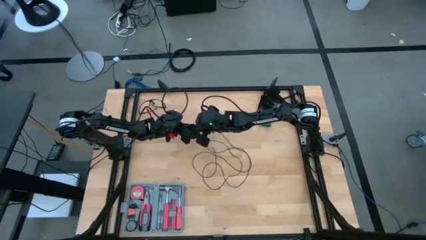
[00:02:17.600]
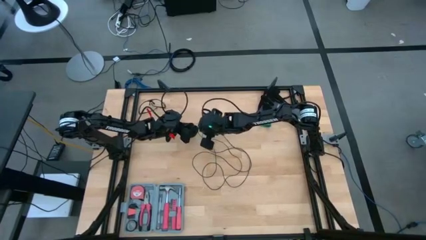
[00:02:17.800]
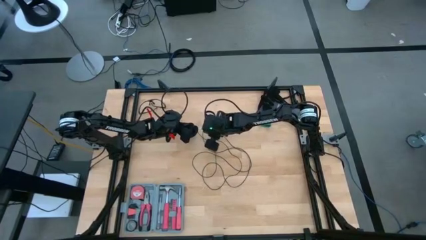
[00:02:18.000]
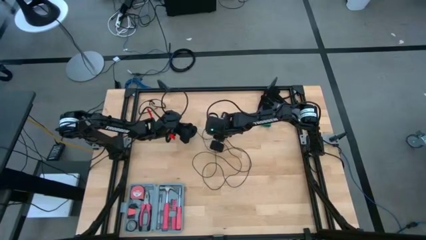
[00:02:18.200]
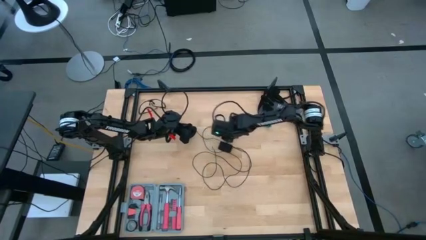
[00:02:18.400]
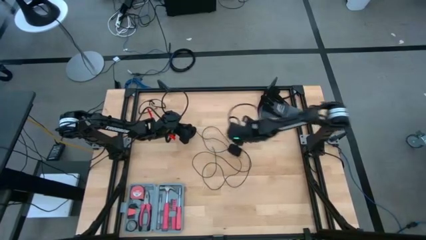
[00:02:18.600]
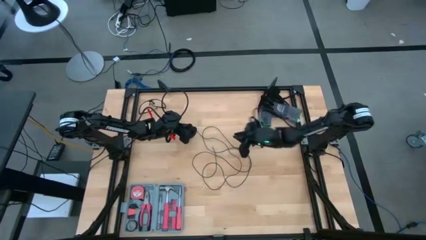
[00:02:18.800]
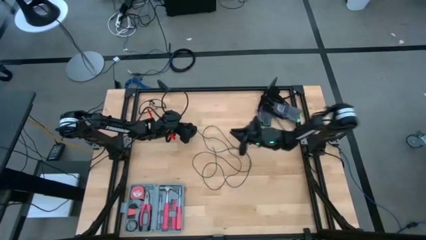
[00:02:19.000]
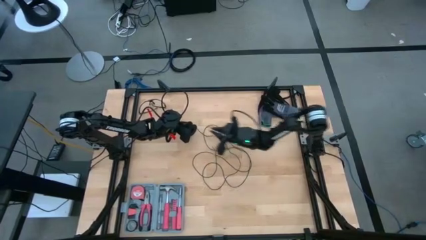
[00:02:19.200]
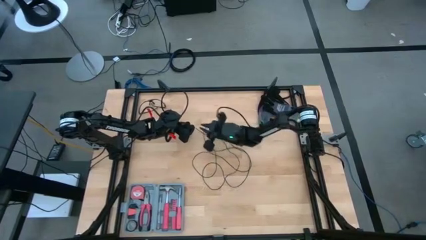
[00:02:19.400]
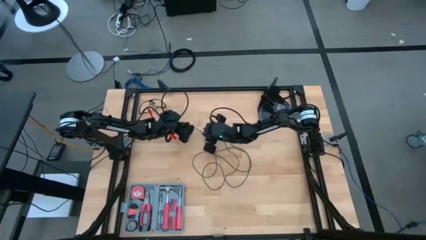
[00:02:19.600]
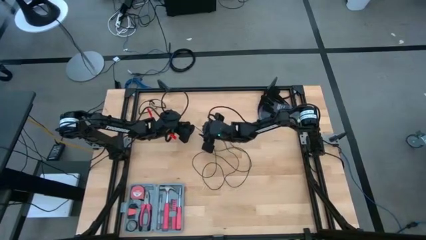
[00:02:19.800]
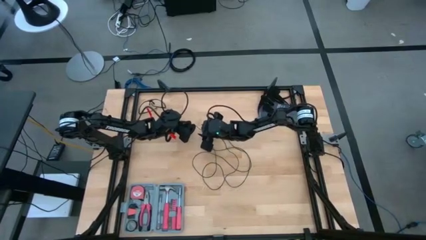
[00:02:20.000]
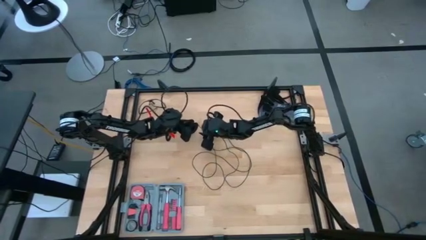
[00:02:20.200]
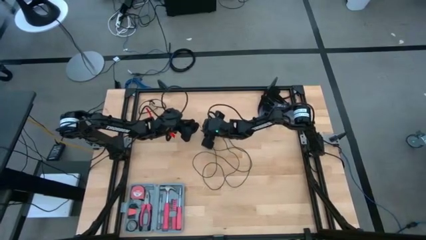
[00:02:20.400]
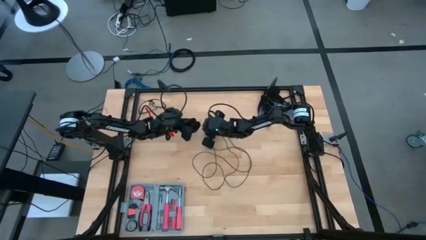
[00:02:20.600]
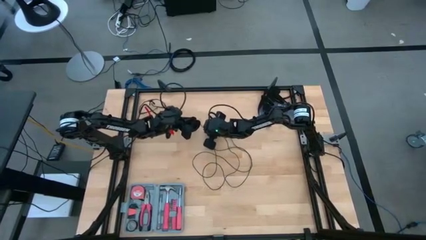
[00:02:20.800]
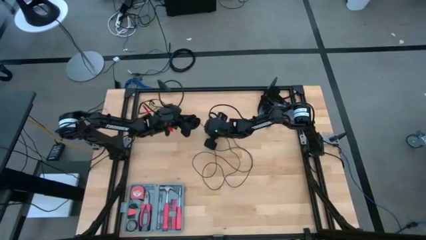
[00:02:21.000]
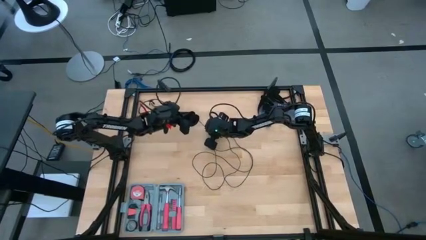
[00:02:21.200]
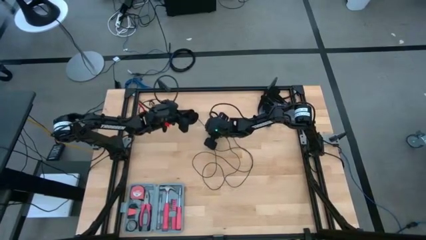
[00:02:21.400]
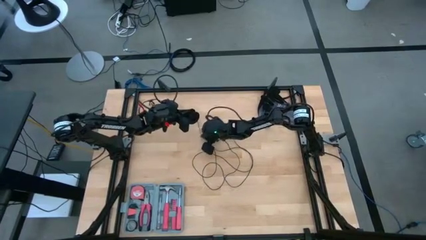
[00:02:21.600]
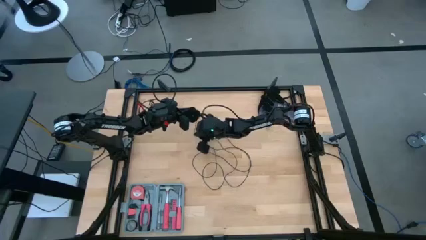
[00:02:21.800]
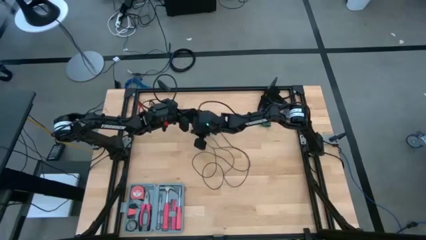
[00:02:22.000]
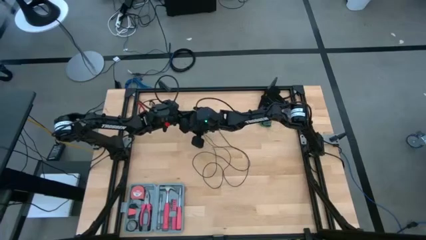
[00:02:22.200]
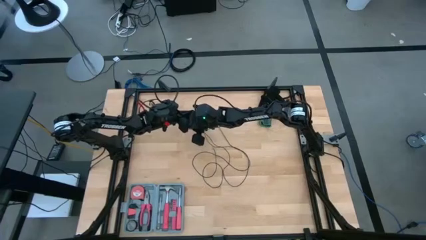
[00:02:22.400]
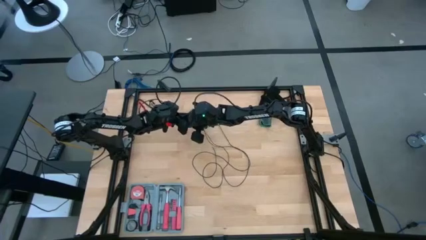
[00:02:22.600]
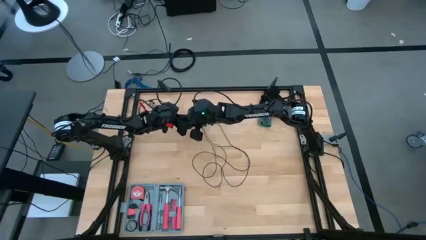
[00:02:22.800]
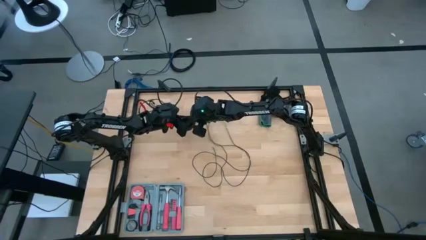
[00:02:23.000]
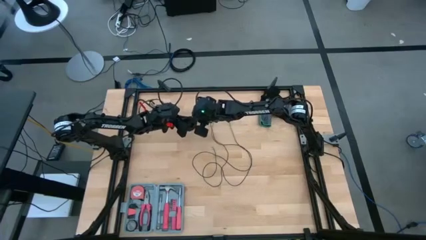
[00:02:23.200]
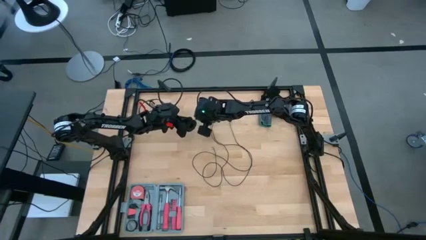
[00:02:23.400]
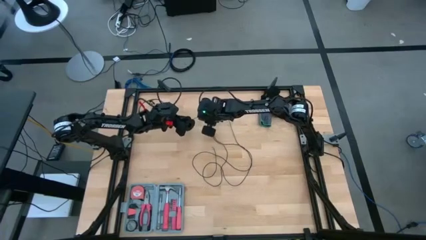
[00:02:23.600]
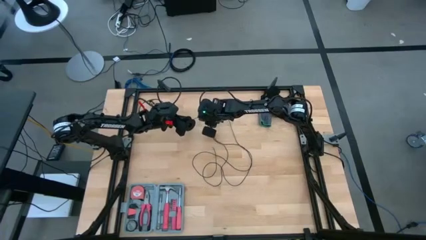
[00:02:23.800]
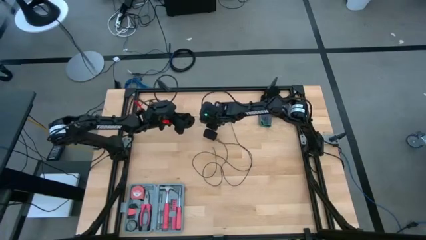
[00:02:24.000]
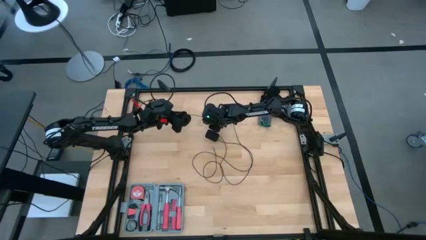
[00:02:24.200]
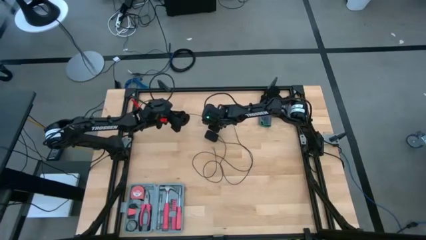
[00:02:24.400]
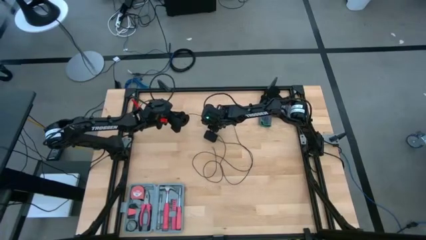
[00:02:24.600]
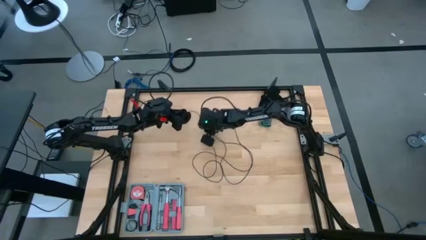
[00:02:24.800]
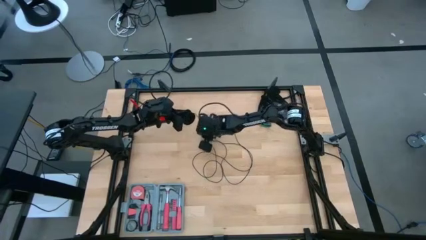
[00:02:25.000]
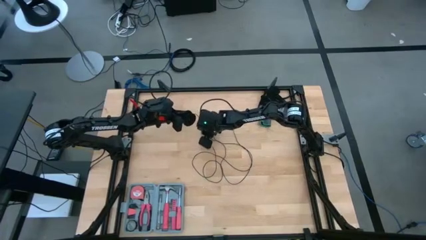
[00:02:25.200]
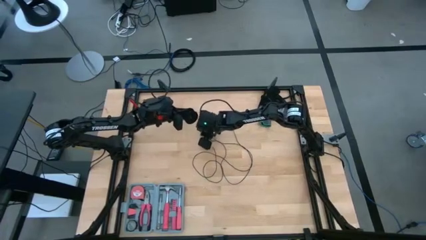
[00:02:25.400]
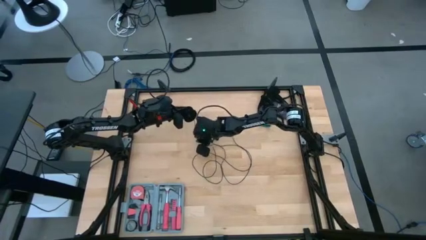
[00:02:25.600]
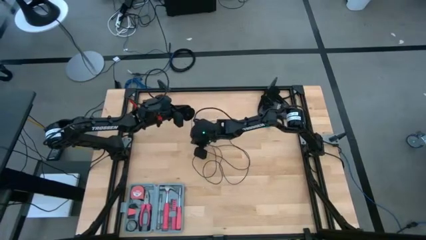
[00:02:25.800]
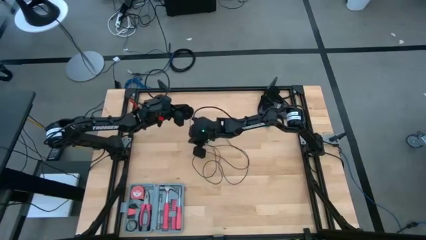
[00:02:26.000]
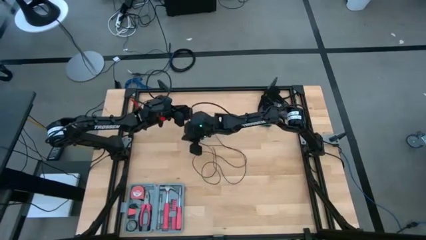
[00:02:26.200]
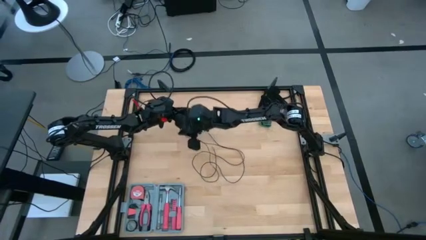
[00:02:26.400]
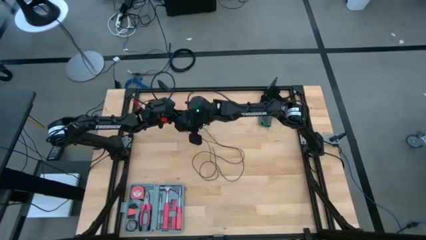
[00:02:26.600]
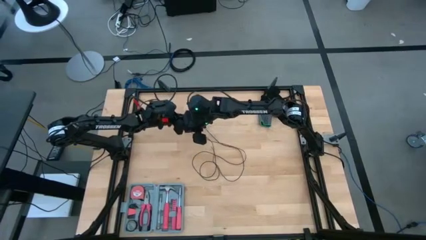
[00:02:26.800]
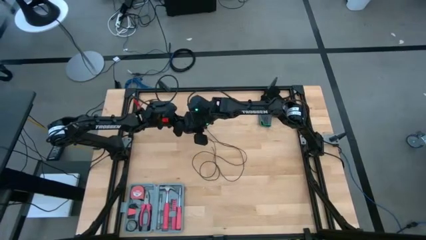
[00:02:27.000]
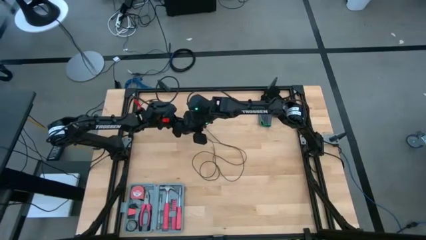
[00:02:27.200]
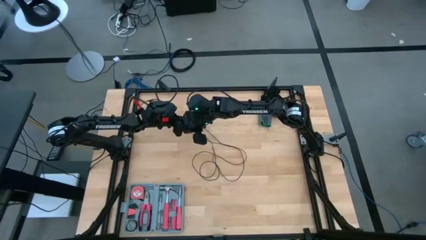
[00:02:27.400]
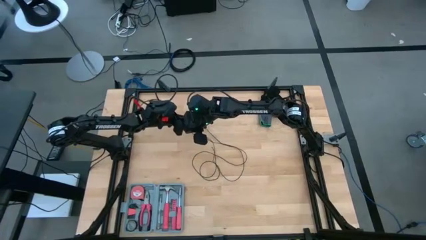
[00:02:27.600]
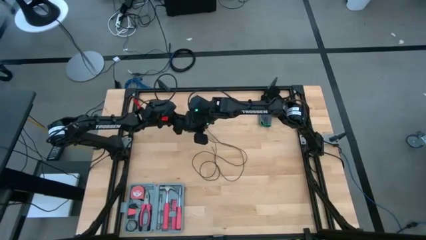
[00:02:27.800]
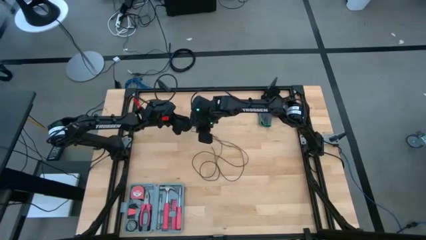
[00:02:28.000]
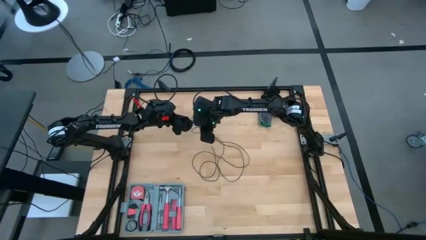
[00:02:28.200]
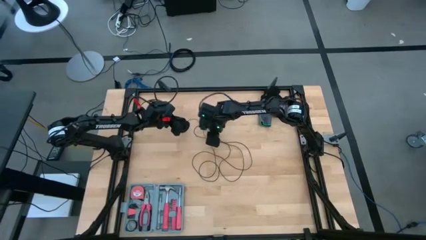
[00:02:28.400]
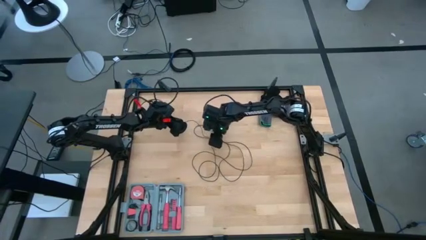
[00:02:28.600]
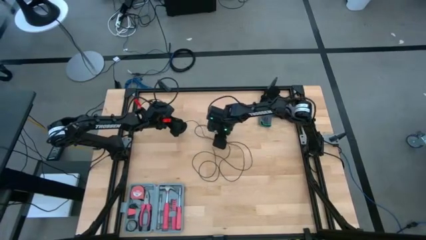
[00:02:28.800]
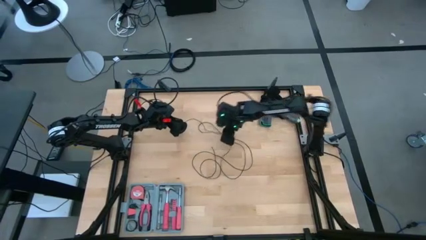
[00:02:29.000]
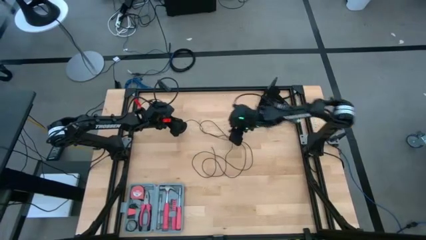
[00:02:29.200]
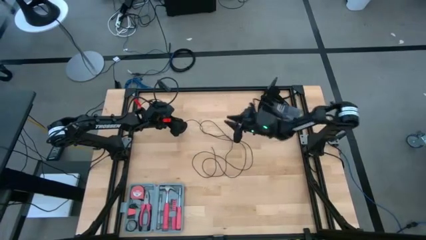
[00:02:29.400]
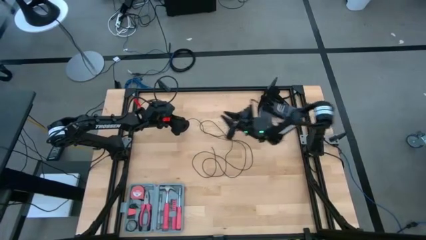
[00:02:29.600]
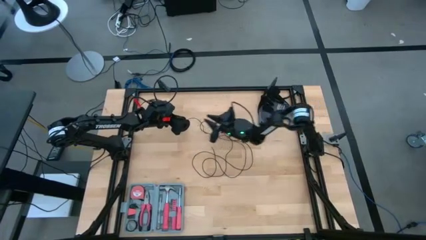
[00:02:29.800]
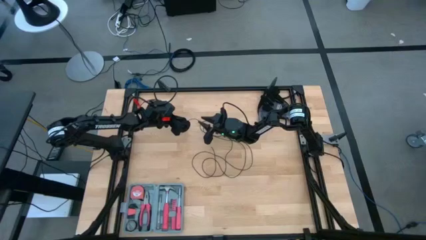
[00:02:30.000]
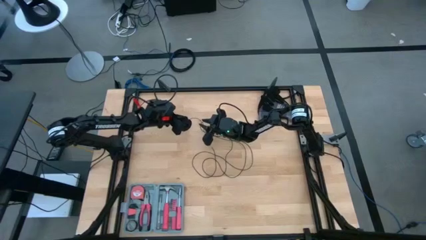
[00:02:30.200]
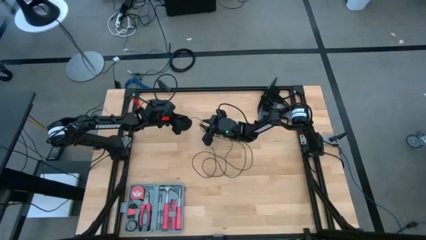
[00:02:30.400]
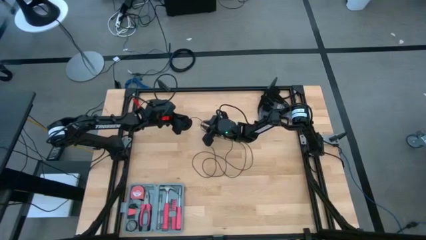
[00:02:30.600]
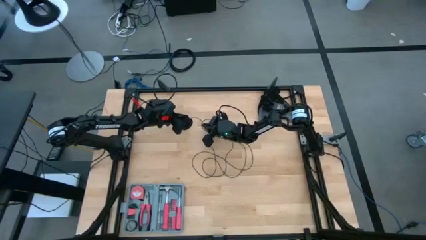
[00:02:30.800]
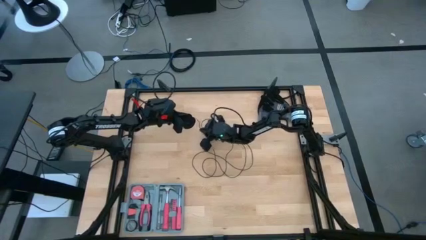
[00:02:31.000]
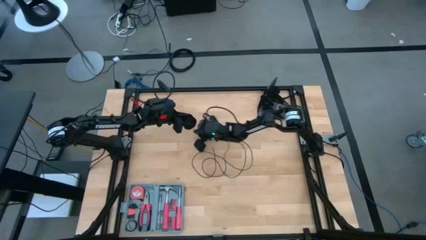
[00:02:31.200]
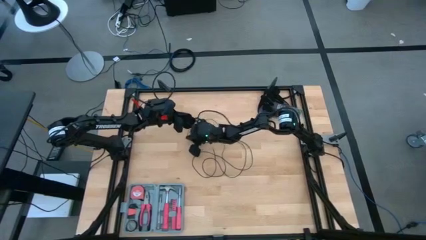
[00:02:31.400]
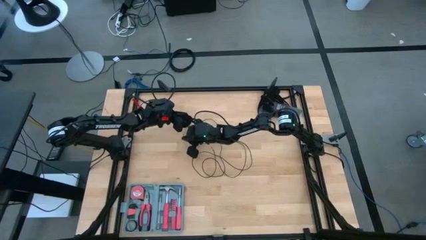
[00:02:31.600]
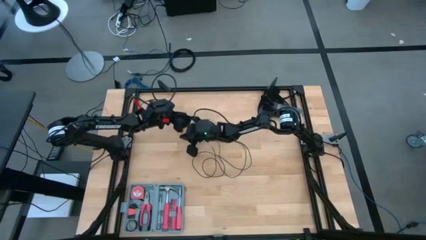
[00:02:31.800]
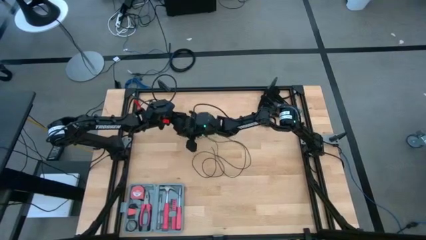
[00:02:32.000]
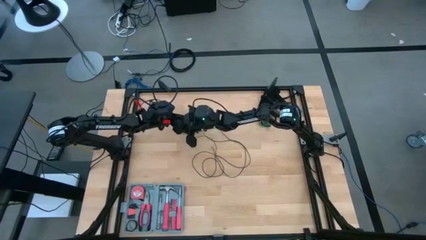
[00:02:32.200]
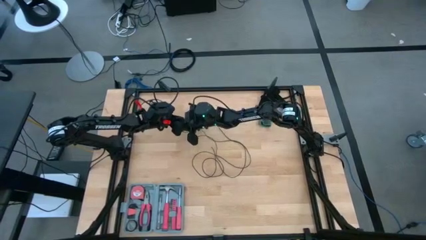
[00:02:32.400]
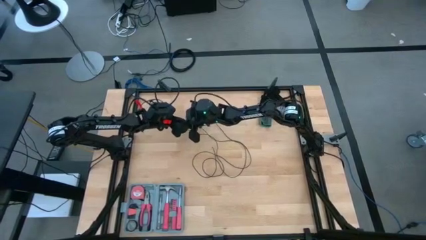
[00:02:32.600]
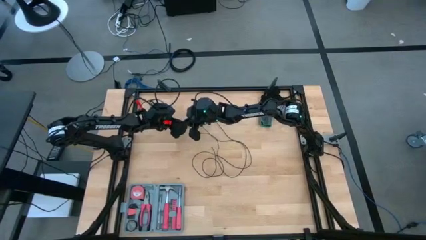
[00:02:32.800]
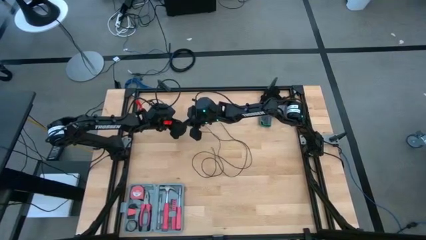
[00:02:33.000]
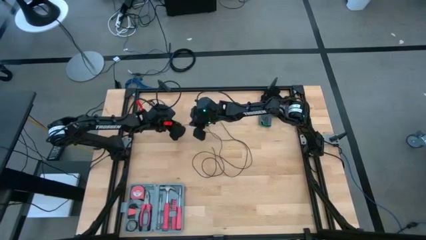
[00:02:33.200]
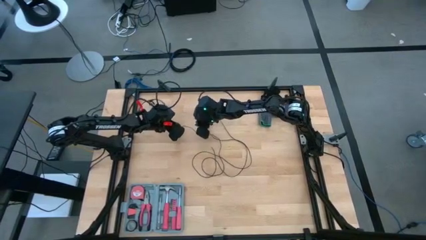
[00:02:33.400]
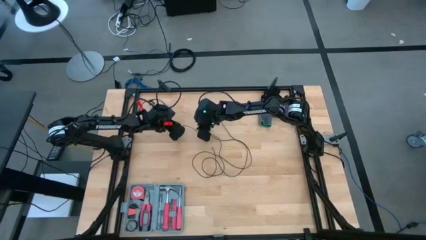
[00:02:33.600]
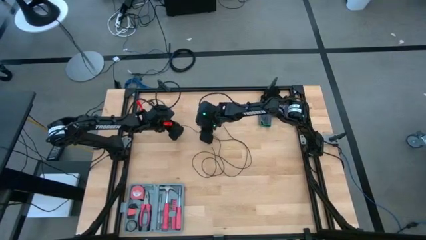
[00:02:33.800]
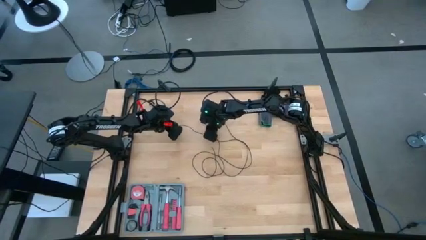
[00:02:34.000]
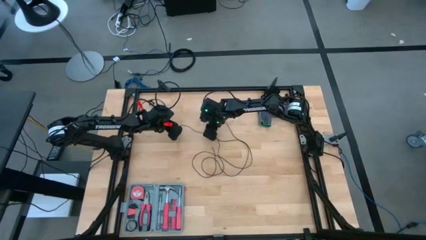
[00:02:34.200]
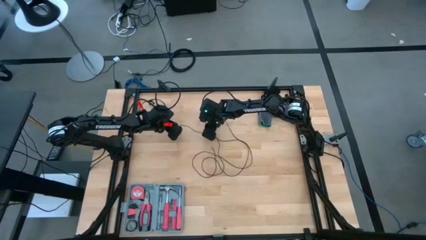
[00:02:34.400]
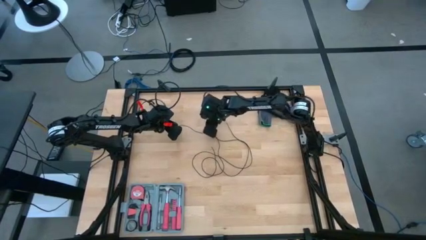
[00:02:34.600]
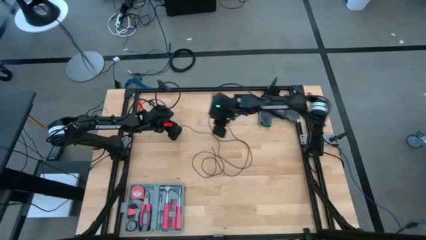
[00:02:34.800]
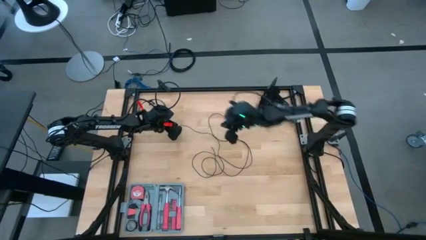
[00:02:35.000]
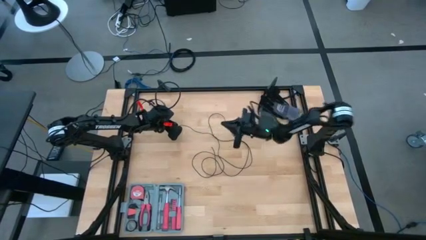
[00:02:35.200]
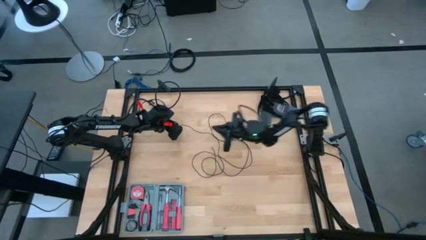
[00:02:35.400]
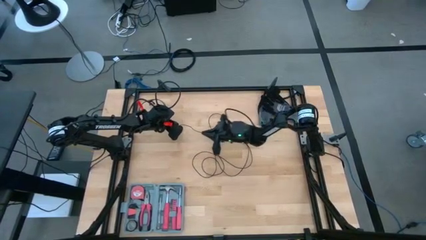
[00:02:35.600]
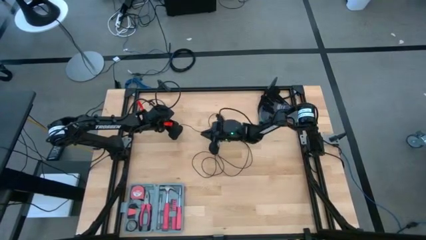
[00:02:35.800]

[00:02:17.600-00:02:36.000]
Task: Coil cords
Coil the black wire onto the black spool
